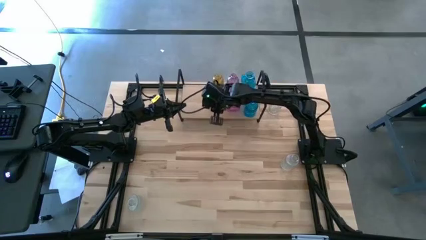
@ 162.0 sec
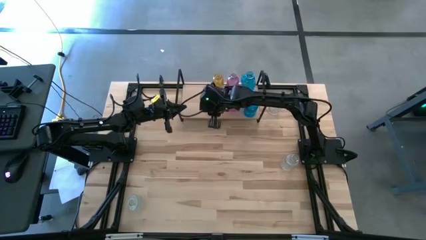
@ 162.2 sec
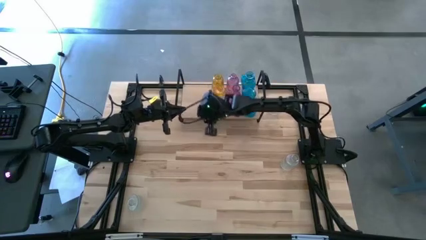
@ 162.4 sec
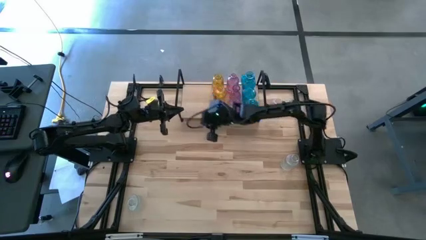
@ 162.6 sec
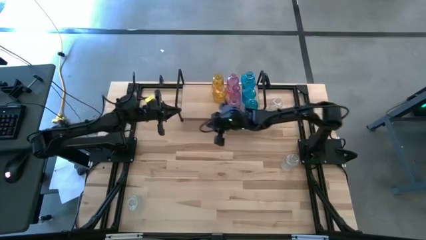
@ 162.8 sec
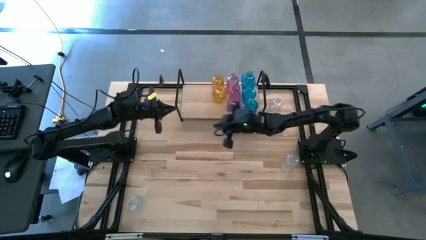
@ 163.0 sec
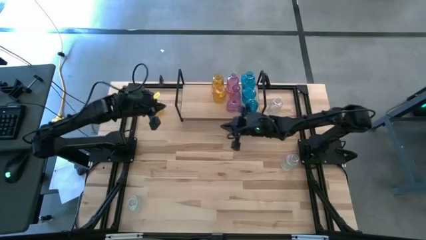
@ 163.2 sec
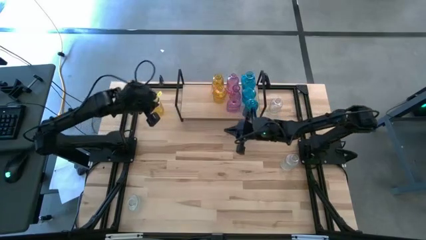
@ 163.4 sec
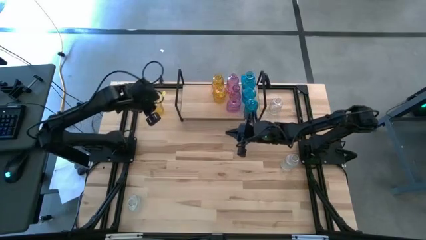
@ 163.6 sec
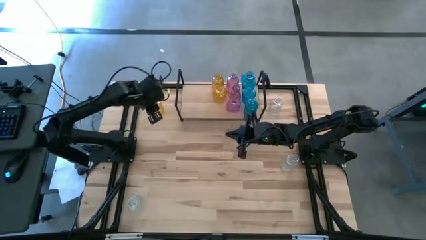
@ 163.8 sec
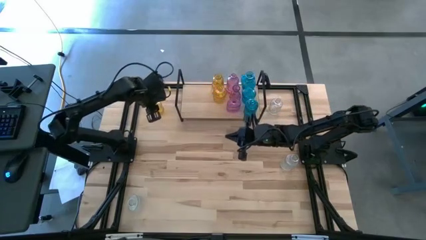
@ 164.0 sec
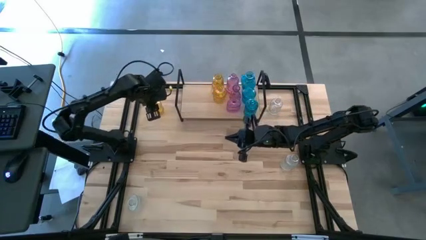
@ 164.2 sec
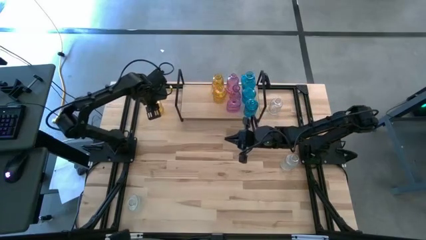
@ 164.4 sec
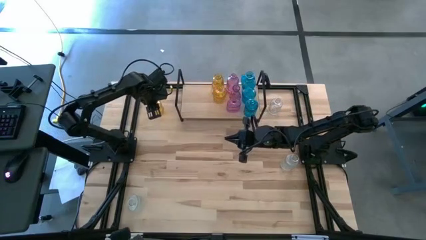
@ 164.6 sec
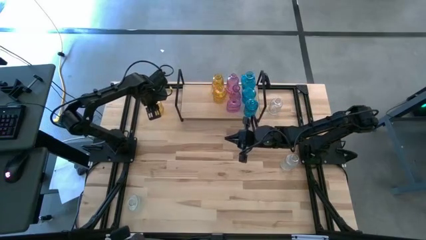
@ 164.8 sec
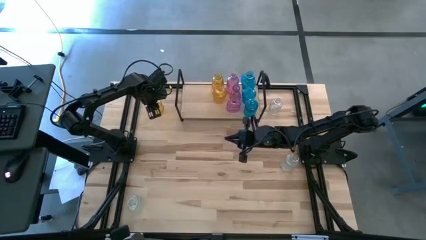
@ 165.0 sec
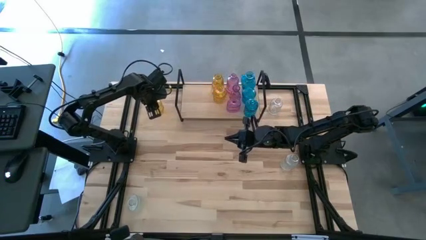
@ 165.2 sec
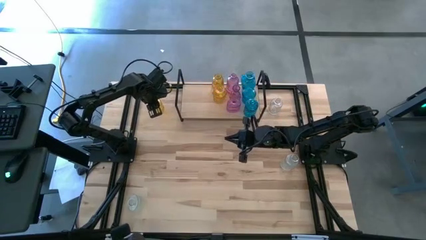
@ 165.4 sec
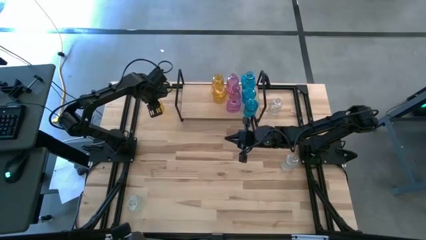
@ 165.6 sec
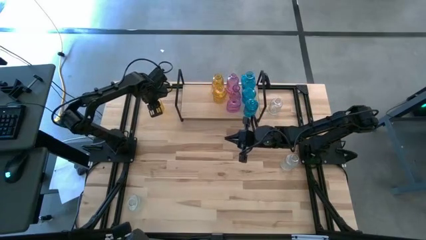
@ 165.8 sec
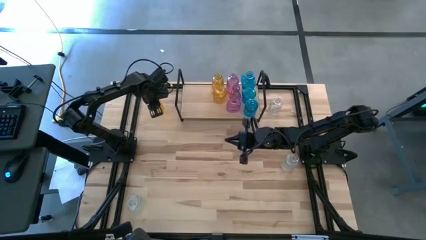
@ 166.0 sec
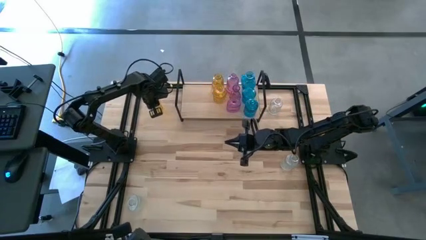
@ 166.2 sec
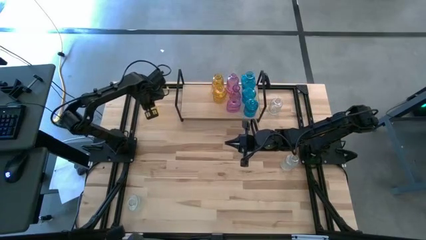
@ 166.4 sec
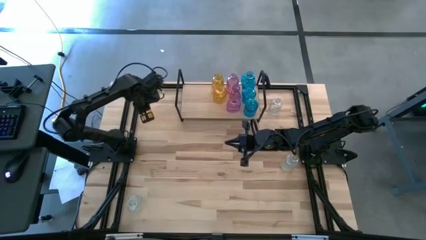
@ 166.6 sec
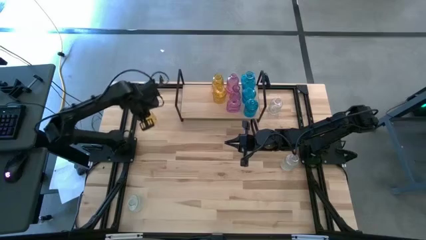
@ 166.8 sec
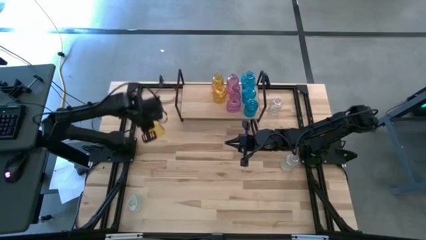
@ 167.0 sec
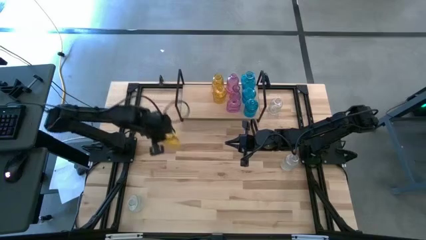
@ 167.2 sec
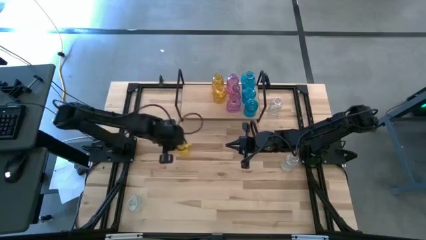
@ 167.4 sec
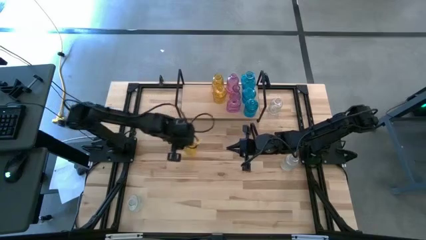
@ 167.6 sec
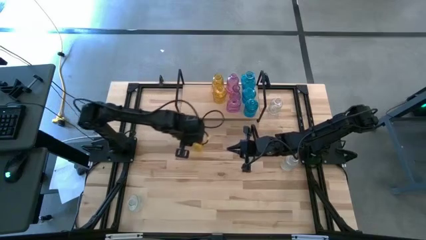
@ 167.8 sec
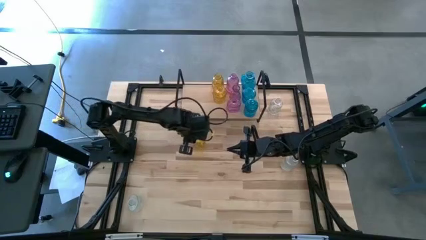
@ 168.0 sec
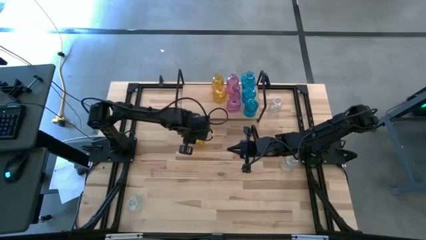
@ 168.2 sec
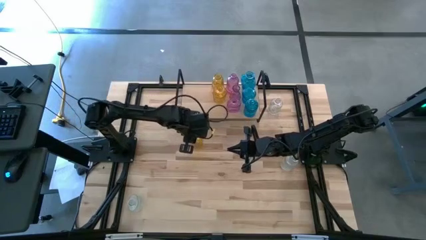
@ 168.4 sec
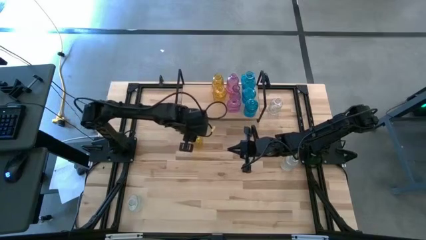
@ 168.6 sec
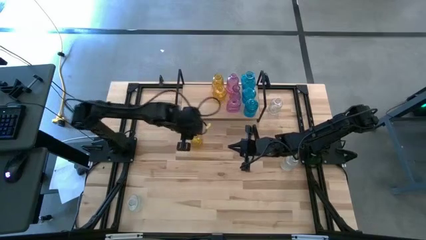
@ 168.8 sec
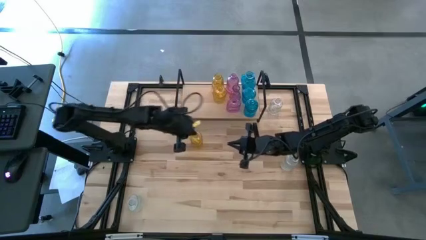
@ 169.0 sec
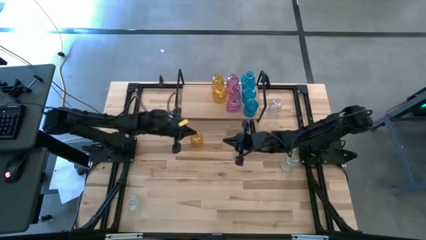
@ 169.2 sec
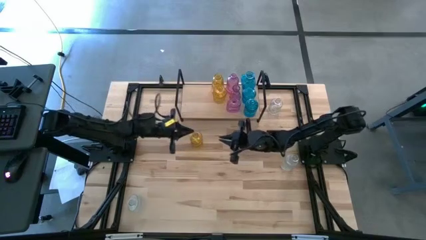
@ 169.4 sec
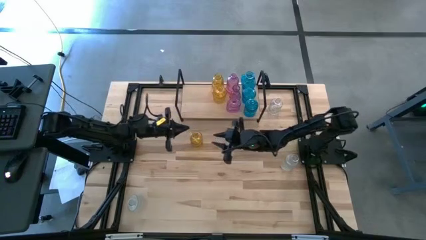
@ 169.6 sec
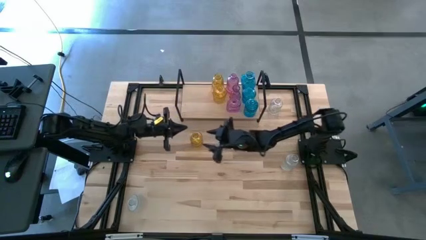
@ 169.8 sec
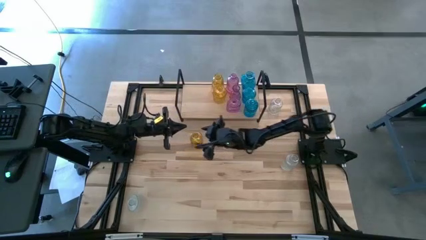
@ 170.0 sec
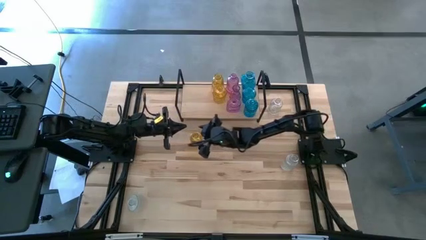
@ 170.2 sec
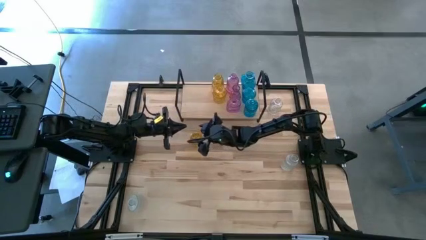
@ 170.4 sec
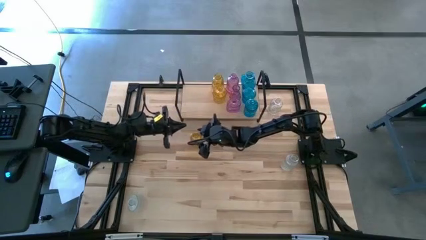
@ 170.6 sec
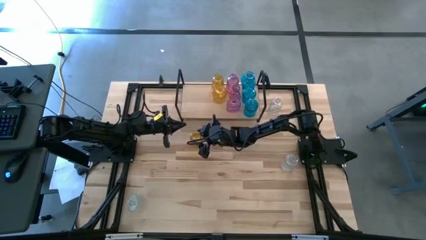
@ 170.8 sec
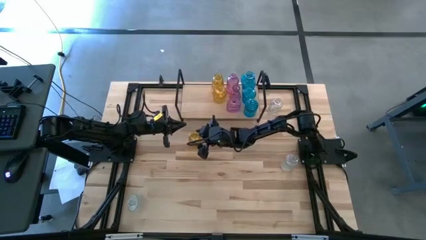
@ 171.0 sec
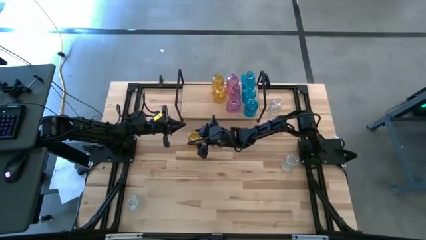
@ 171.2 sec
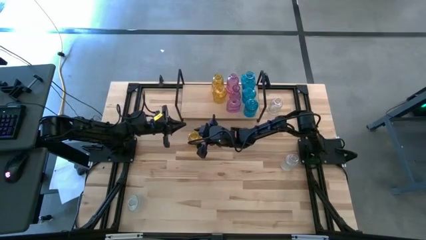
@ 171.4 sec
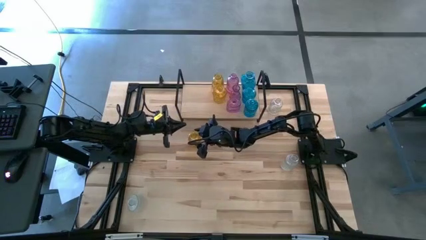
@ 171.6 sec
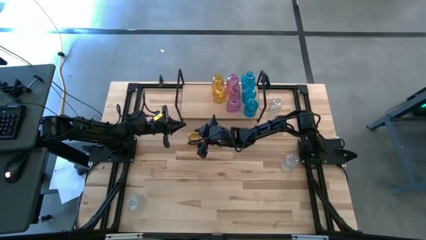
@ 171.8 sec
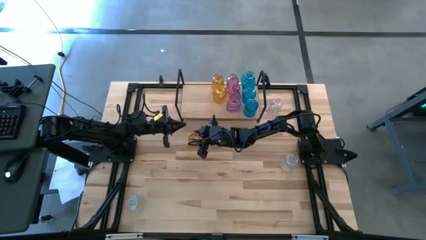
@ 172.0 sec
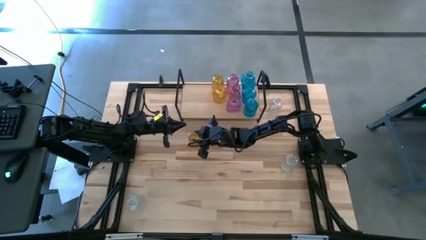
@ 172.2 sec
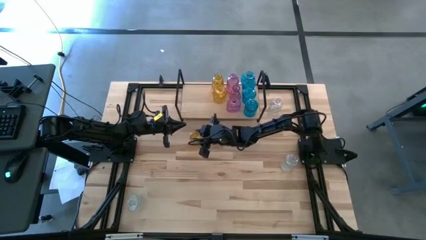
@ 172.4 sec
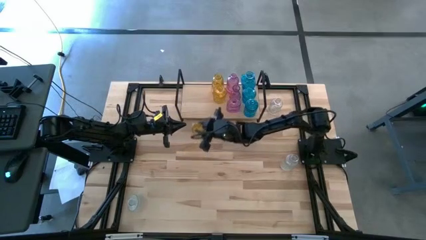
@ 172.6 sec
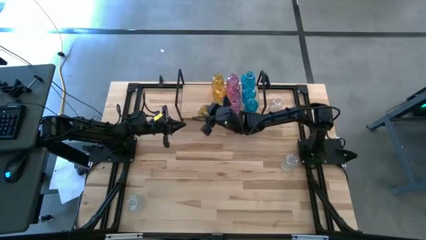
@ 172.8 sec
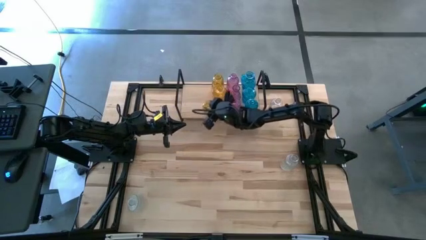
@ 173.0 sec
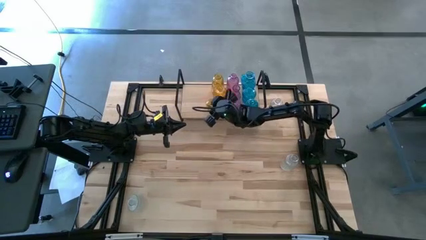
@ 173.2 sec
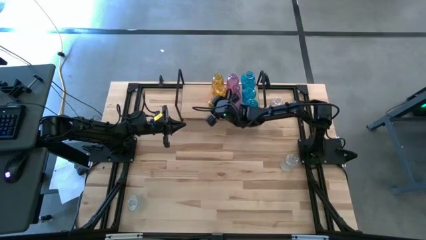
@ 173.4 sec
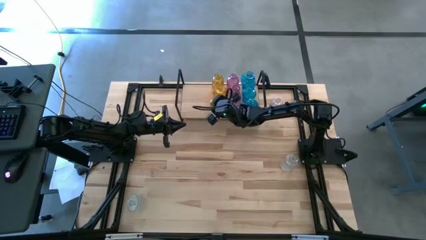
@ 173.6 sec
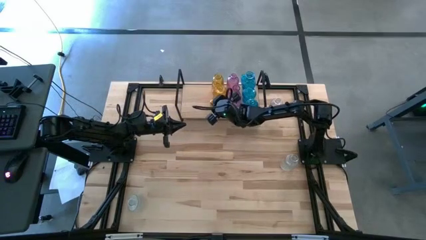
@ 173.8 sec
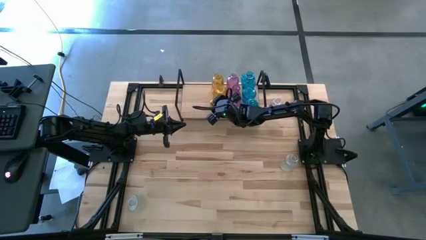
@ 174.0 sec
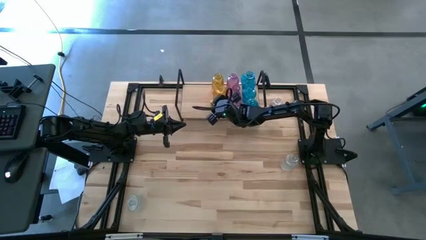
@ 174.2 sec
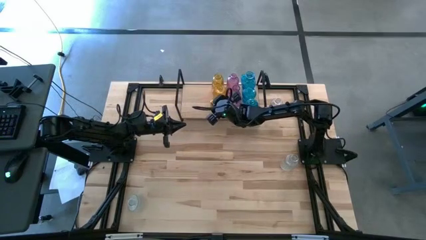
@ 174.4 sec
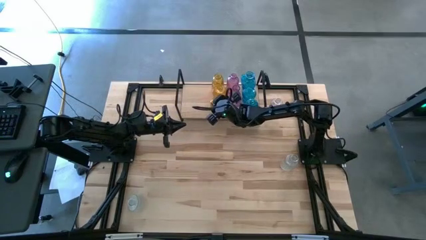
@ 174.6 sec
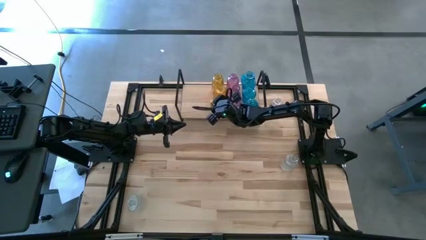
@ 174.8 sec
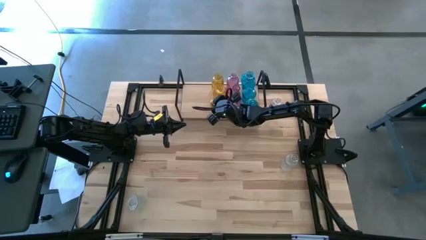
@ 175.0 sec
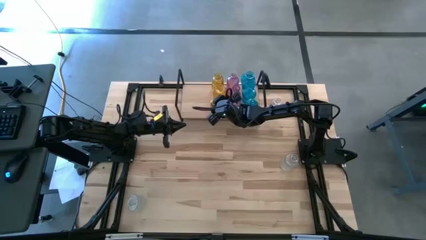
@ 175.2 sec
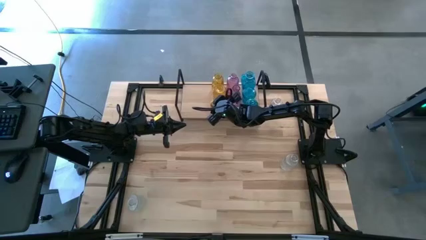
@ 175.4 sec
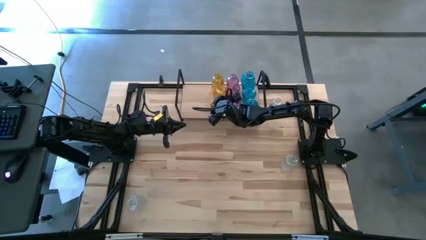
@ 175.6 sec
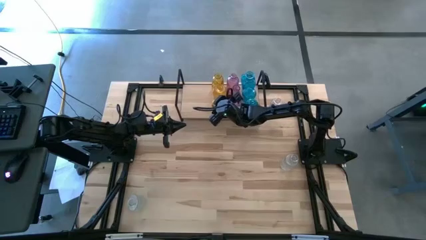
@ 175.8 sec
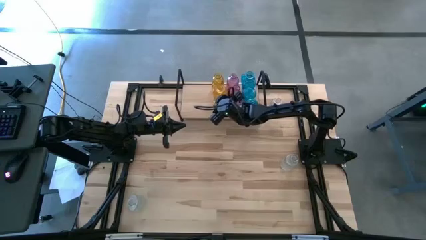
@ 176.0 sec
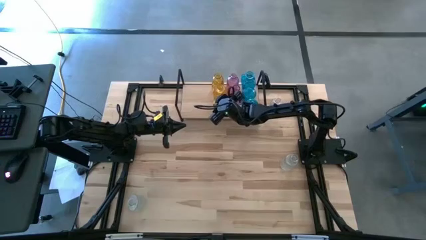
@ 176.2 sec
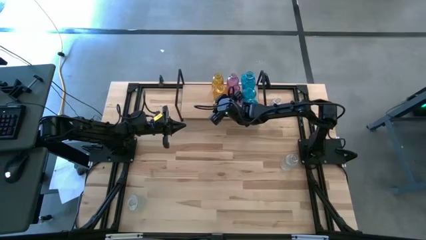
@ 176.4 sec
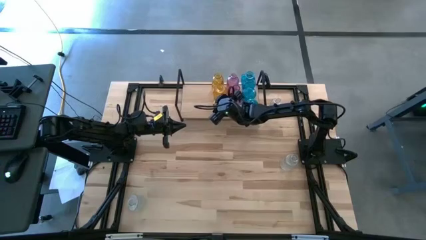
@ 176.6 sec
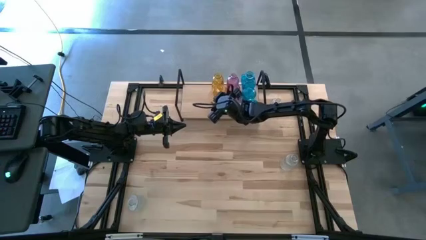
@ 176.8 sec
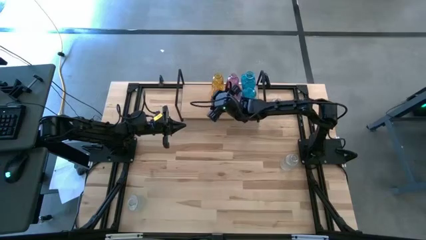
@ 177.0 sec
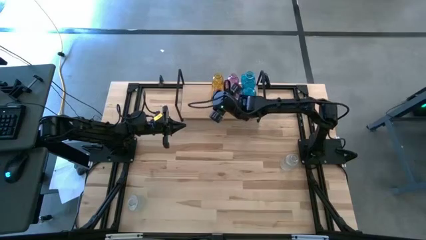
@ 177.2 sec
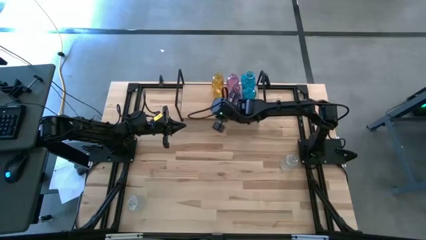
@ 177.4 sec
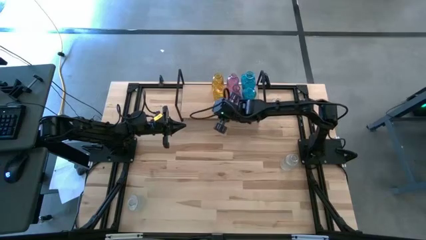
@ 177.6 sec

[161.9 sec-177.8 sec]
Task: sort vases onto shelf
Put the yellow vase on the shelf aligned with the other yellow vases
